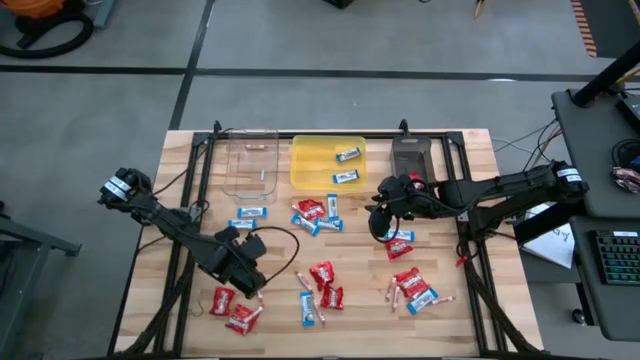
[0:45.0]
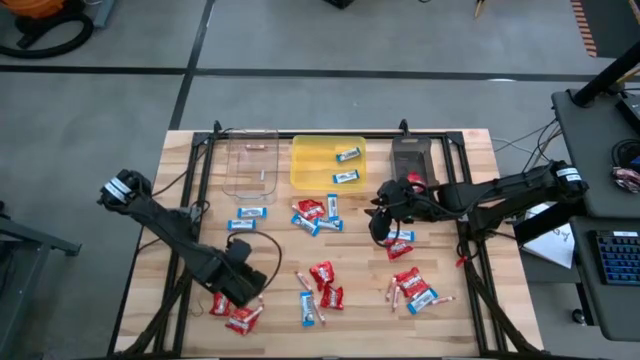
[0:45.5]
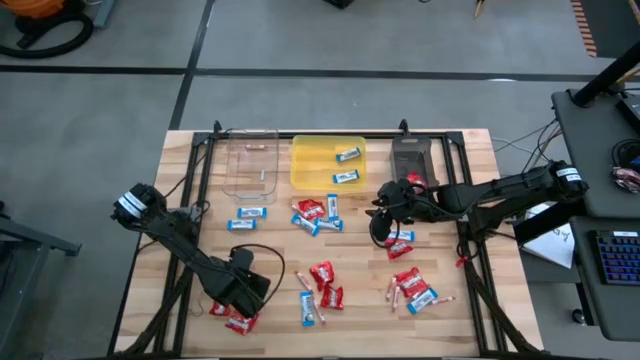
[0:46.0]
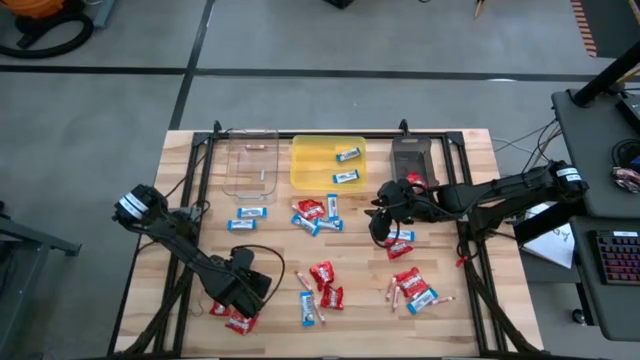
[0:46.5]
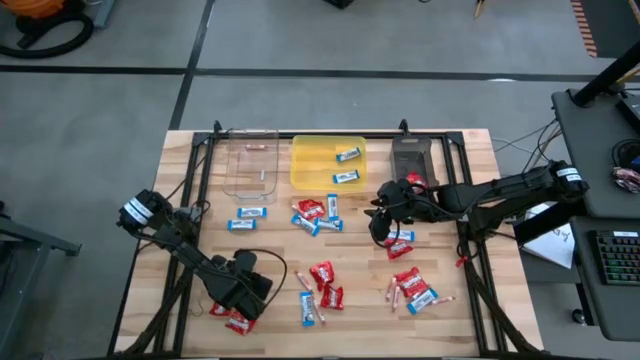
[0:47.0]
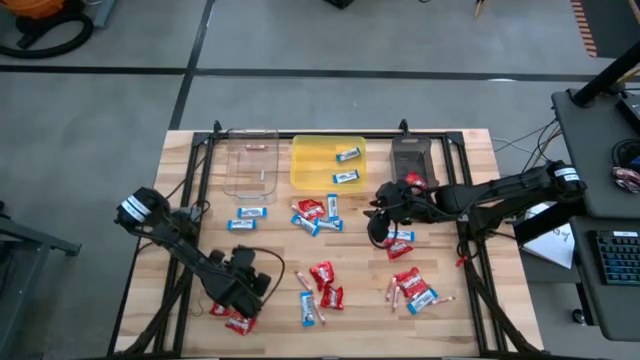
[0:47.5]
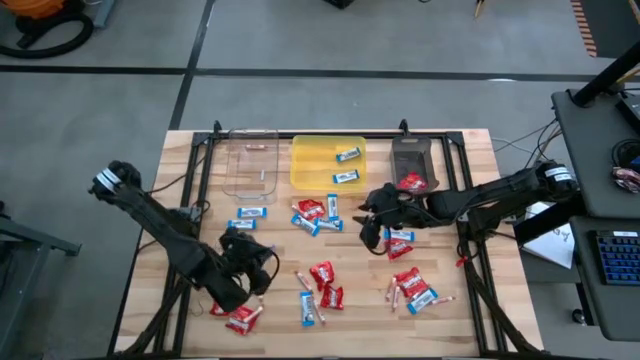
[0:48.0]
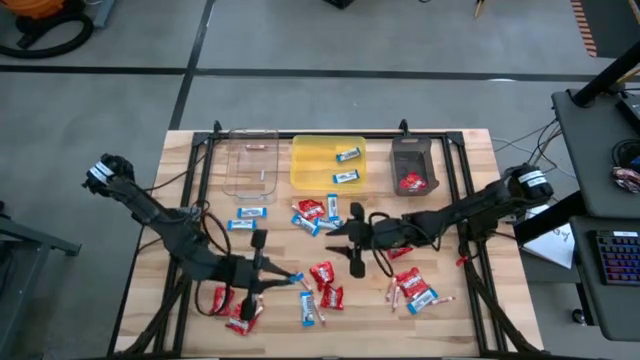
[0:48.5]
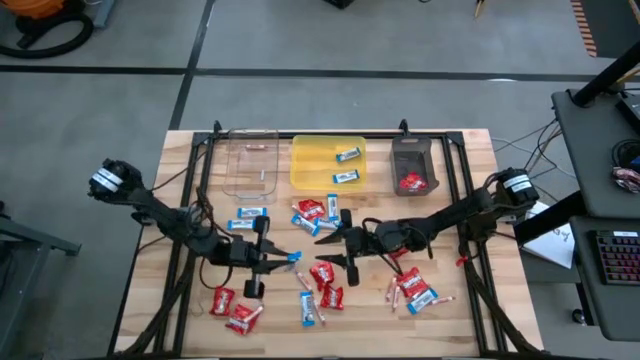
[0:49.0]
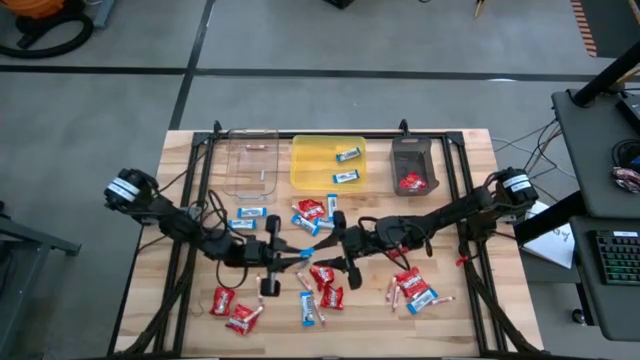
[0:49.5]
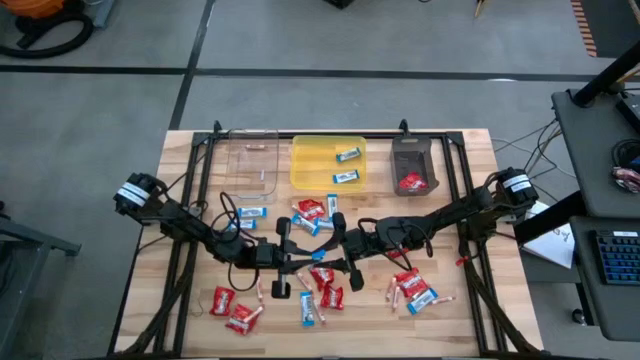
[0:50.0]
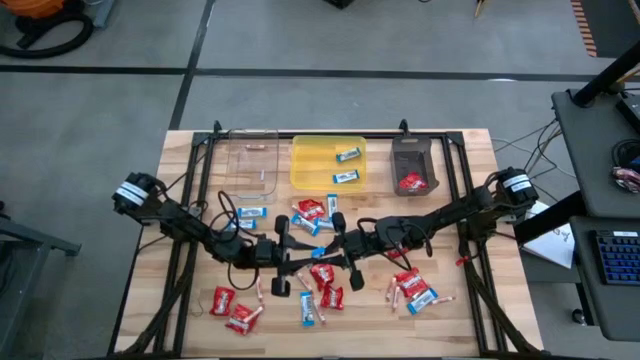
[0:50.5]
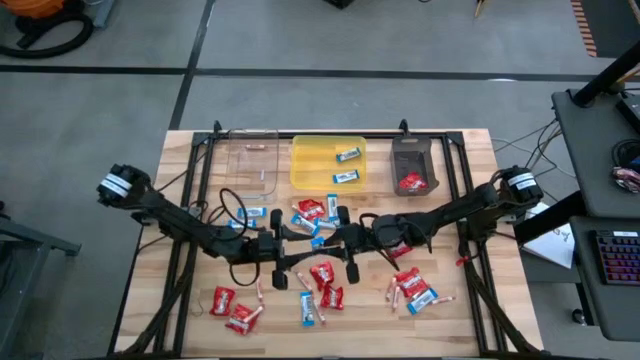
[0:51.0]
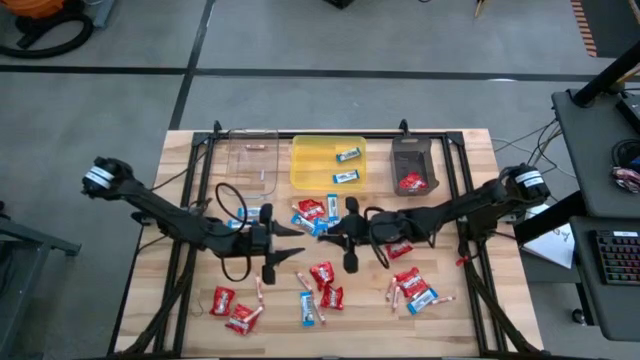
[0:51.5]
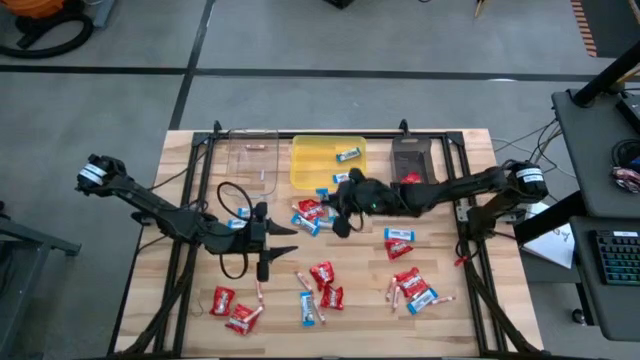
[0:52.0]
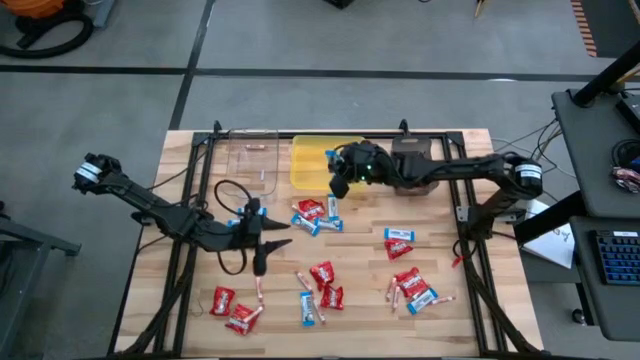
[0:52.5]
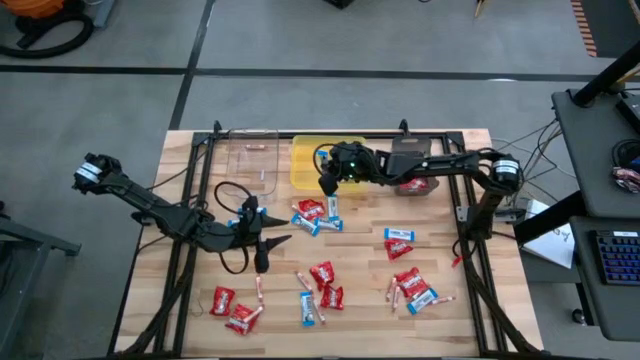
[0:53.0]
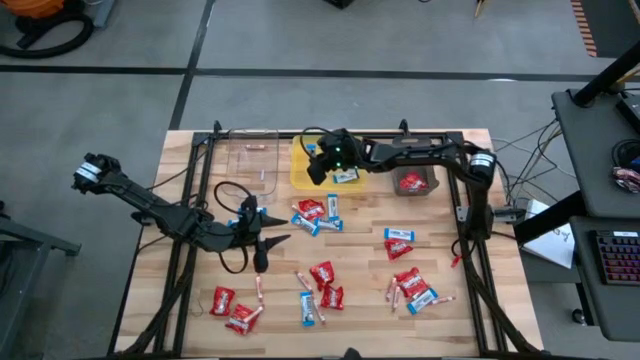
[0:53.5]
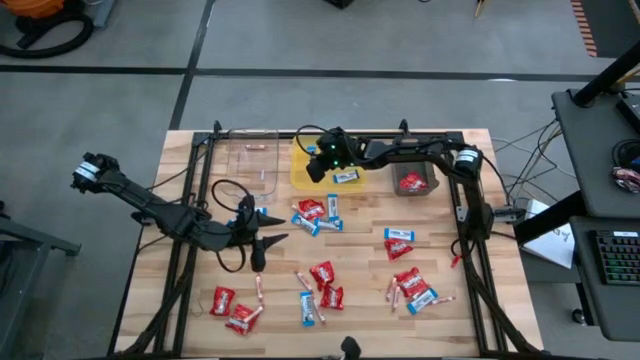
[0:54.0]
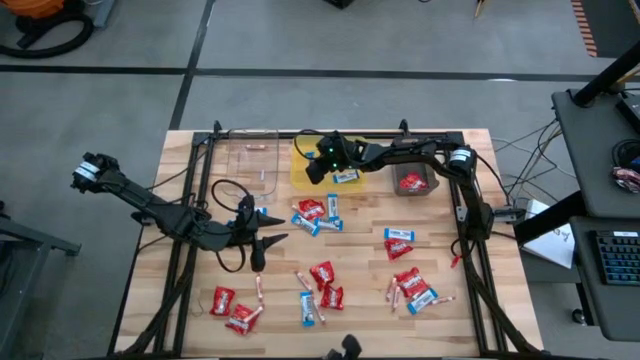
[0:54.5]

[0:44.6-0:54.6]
Task: Sort candy
Put the white chocolate into the yellow bin

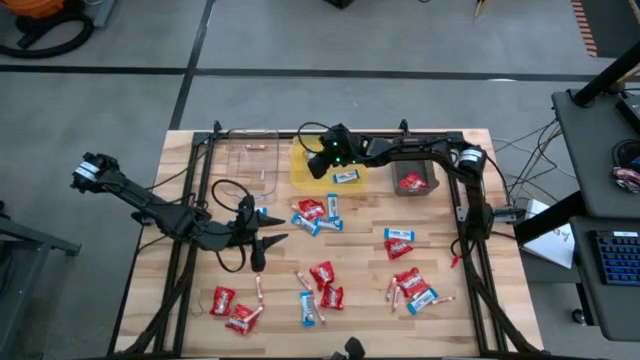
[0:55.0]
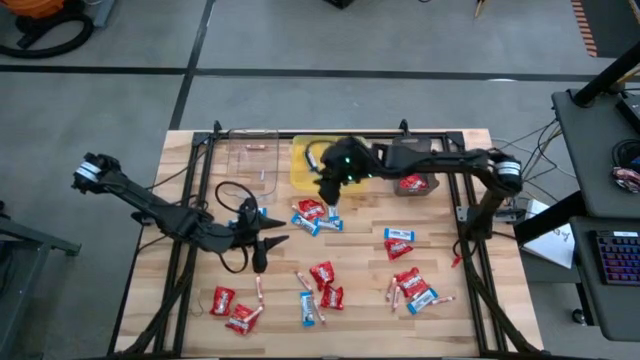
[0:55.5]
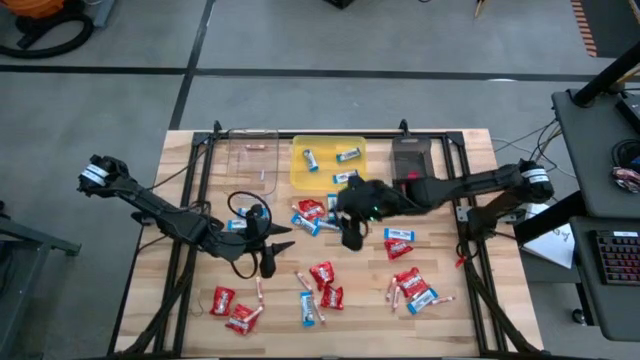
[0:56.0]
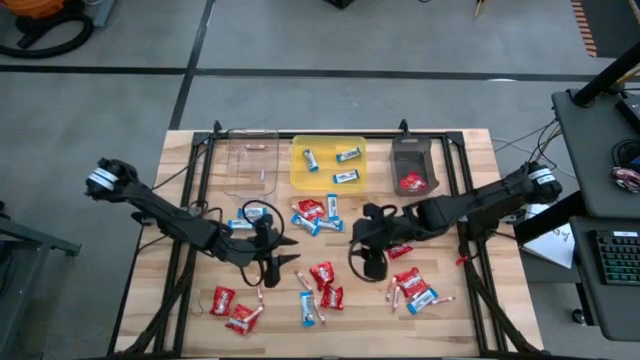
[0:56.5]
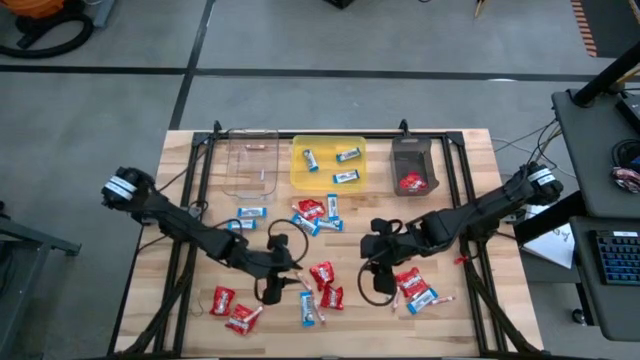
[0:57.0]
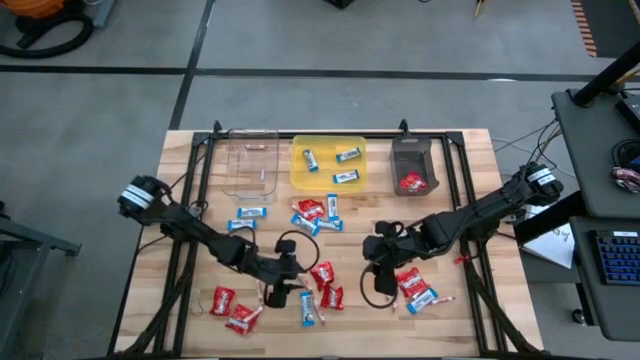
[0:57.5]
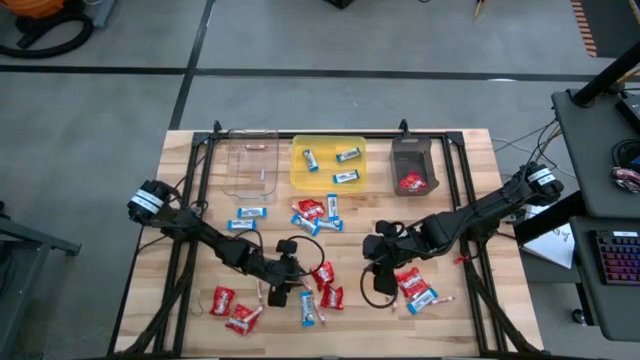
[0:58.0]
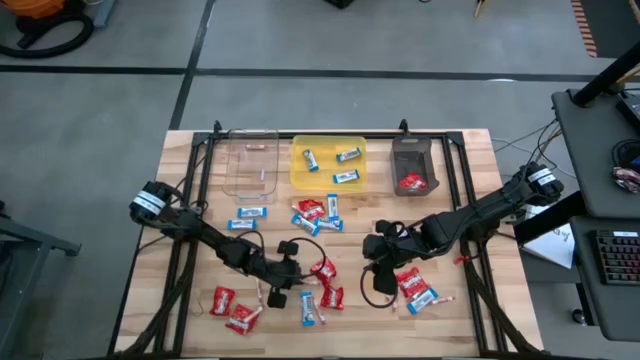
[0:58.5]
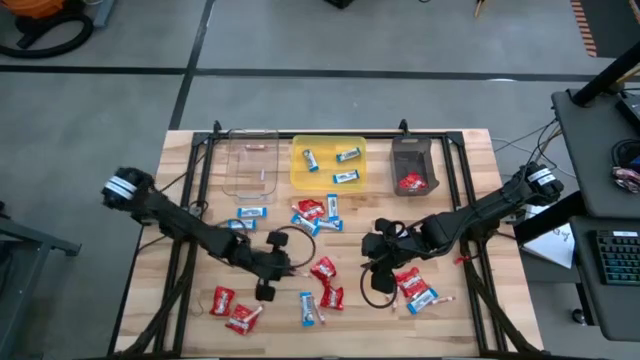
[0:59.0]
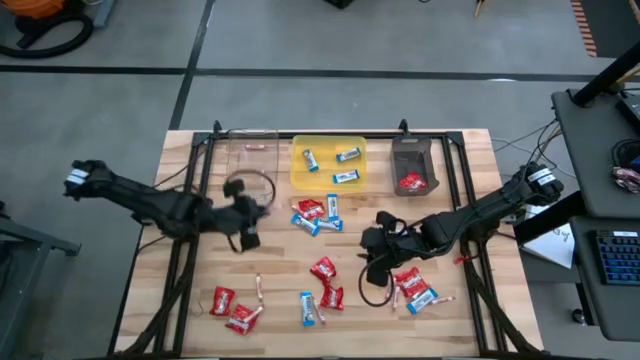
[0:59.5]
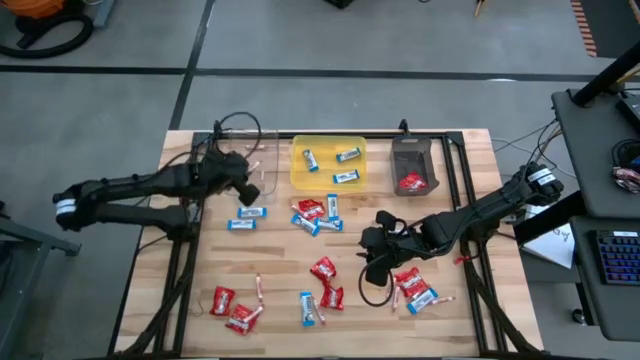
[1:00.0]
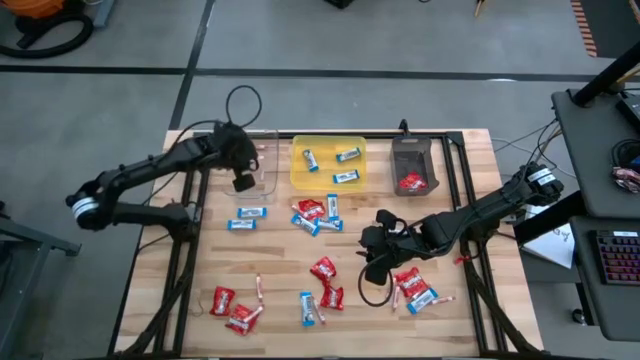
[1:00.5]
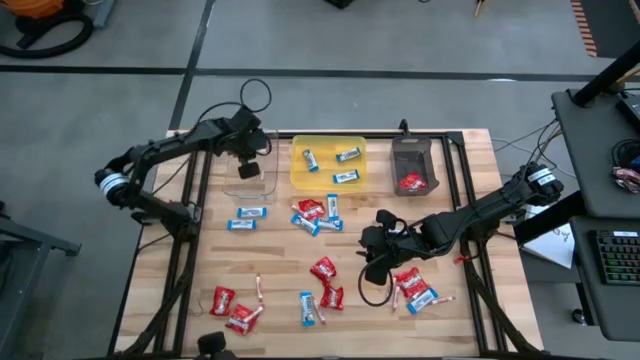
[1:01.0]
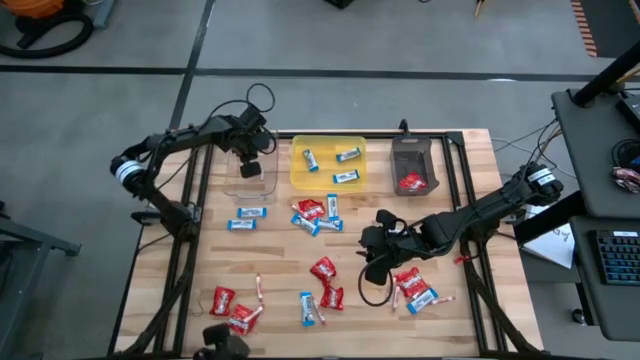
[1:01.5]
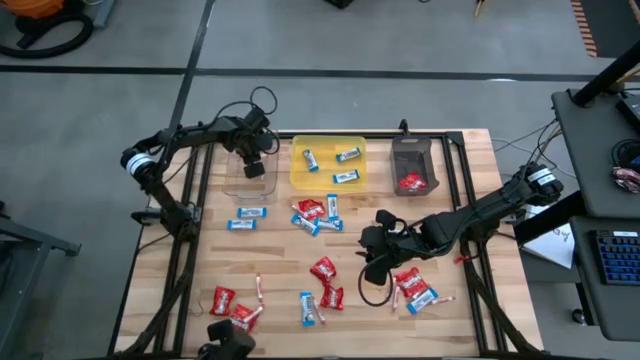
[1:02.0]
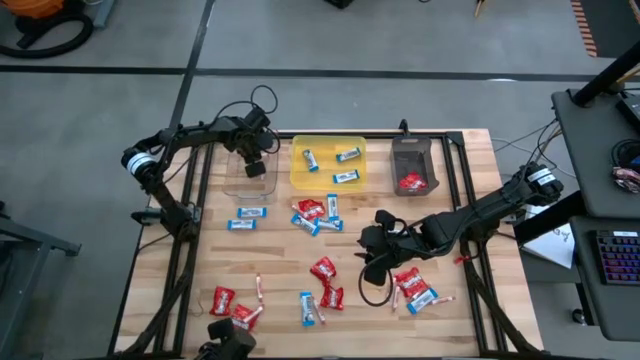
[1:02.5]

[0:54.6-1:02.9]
Put the orange candy into the transparent bin

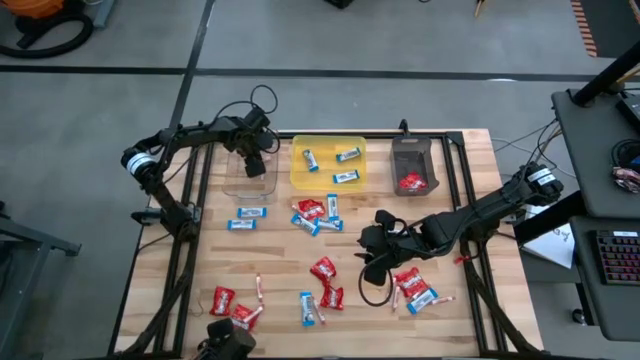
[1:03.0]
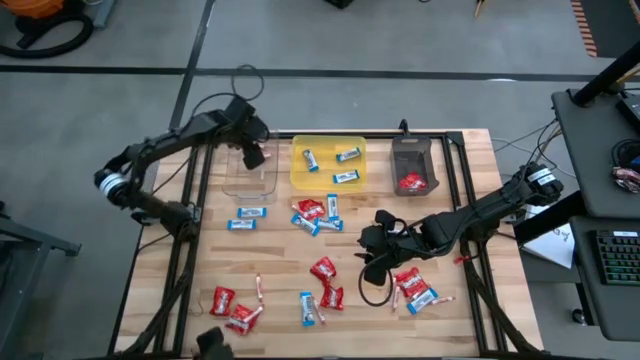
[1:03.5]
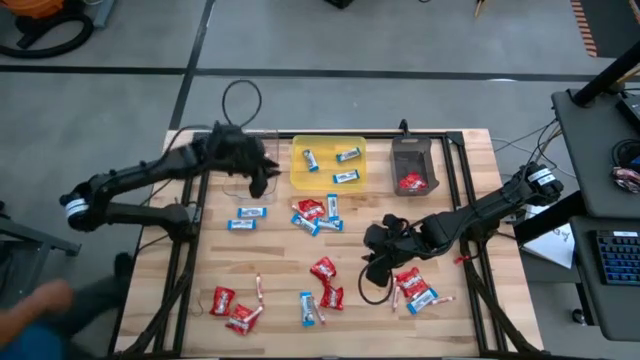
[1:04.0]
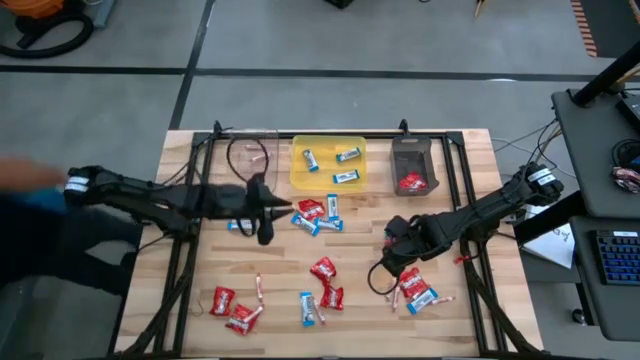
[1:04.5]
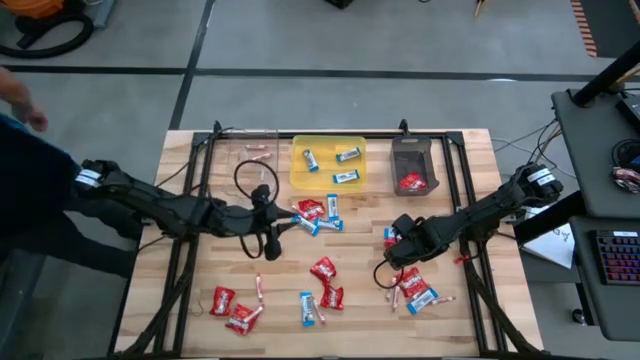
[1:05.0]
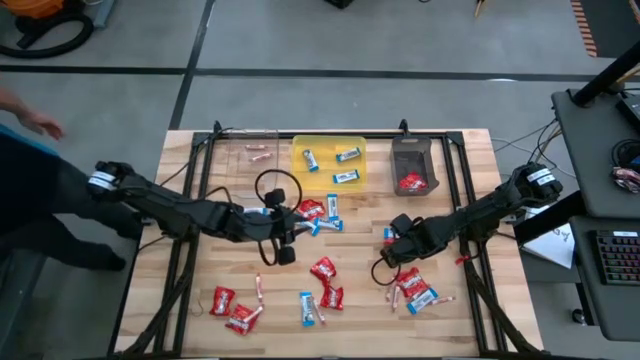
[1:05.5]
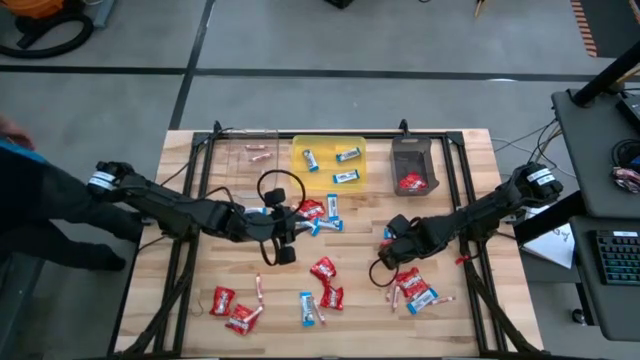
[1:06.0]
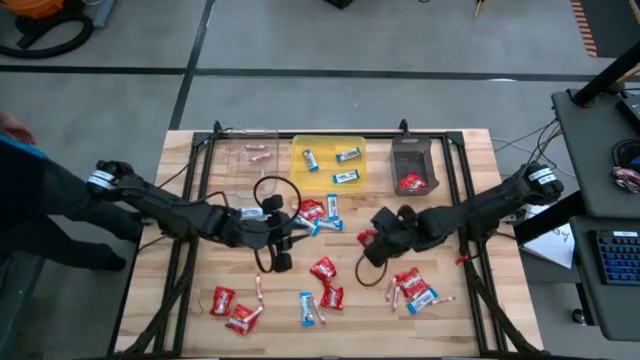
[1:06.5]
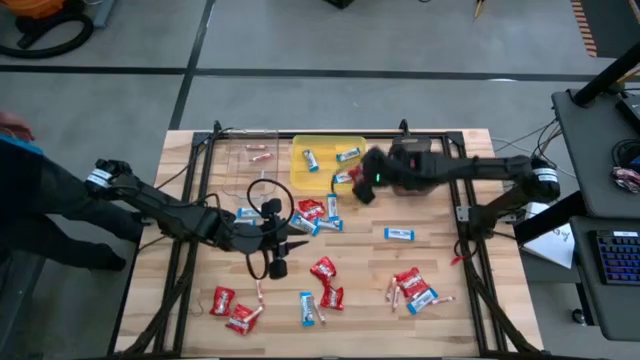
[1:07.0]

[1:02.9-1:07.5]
Put the red candy into the black bin

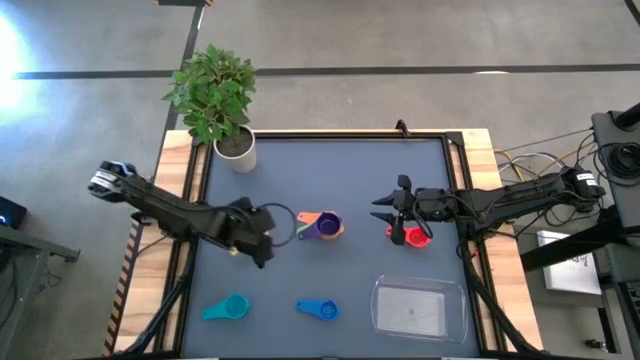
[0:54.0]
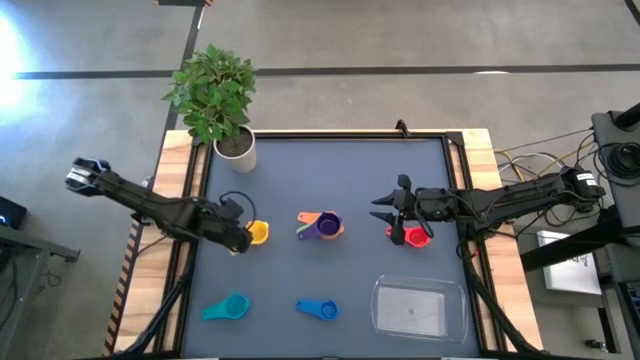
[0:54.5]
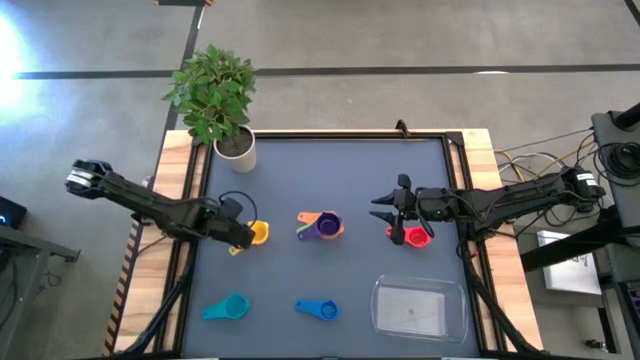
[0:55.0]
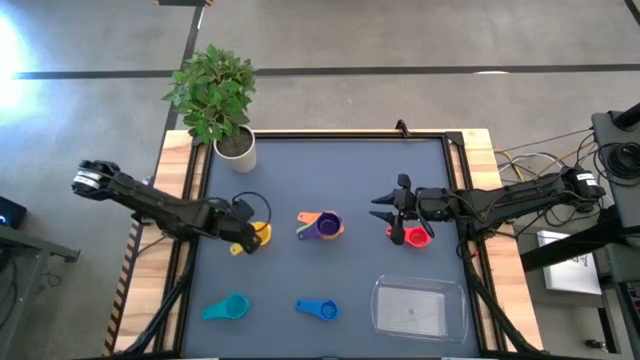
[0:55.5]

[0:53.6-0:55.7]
Task: Nest measuring cups in basket
Stack the yellow measuring cup on top of the purple measuring cup
